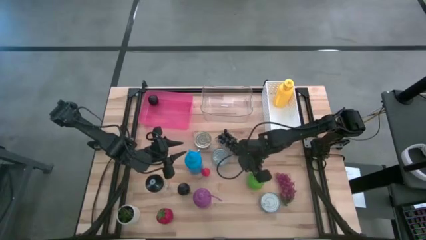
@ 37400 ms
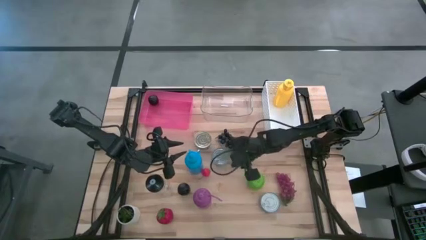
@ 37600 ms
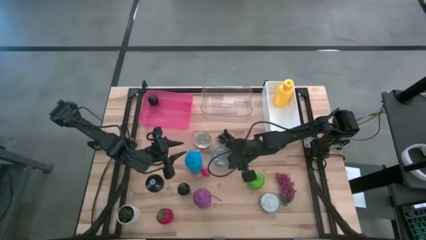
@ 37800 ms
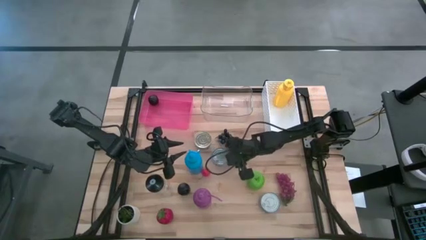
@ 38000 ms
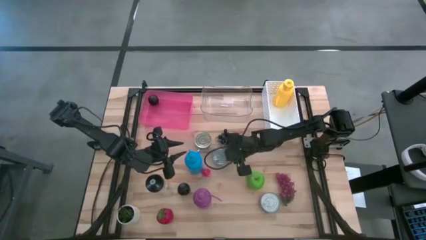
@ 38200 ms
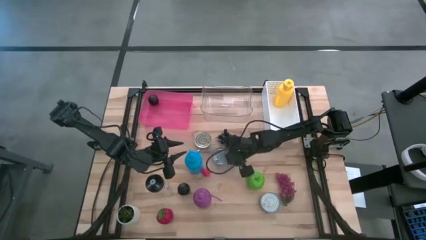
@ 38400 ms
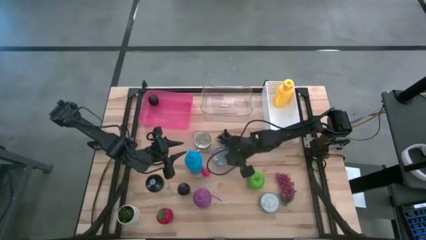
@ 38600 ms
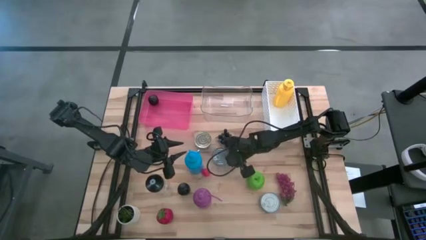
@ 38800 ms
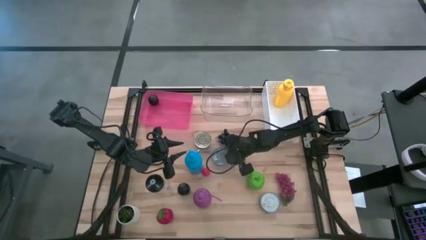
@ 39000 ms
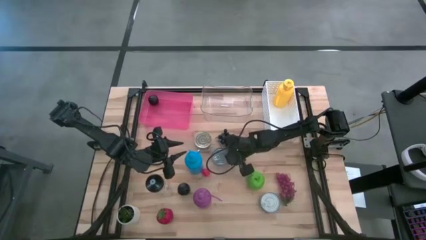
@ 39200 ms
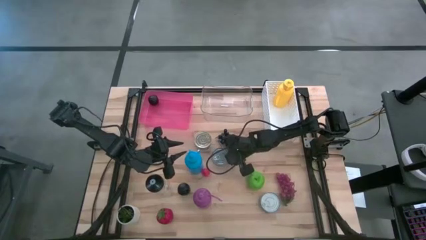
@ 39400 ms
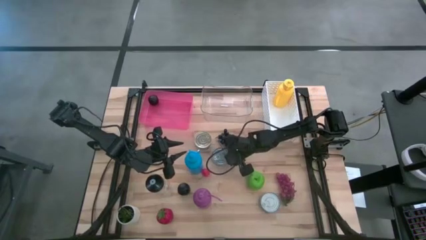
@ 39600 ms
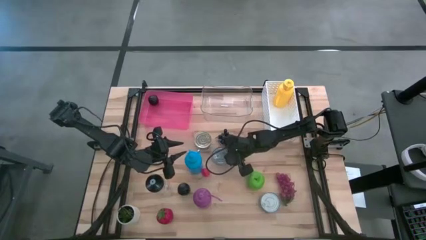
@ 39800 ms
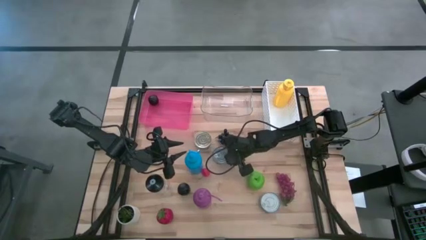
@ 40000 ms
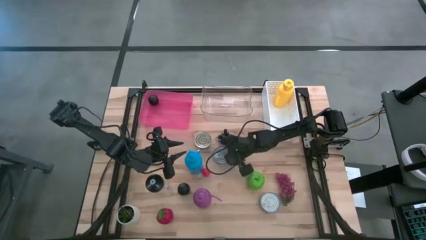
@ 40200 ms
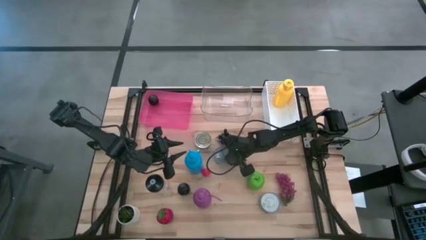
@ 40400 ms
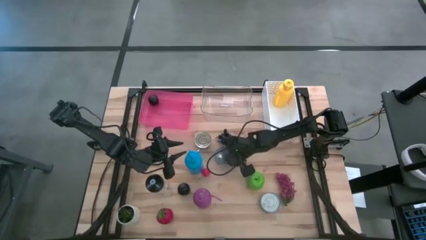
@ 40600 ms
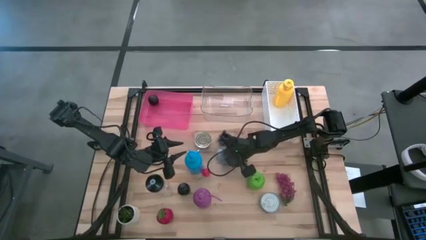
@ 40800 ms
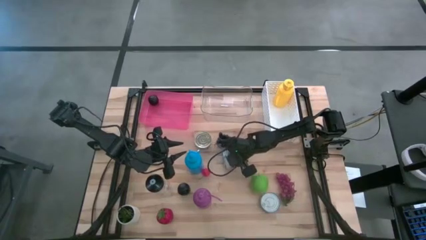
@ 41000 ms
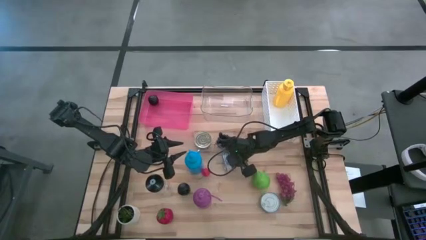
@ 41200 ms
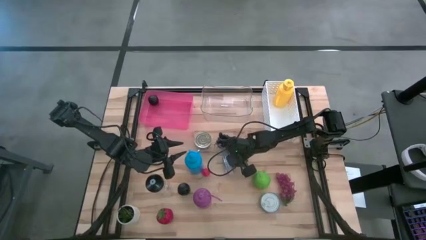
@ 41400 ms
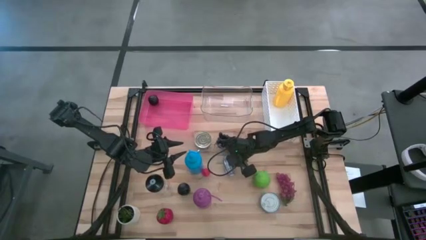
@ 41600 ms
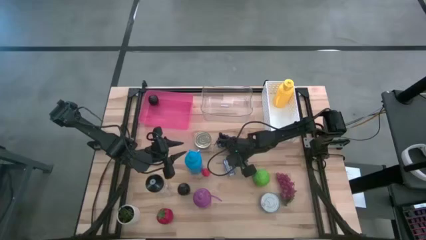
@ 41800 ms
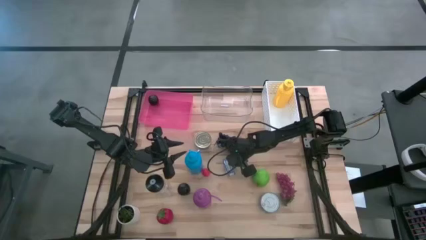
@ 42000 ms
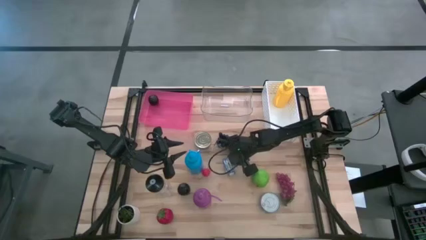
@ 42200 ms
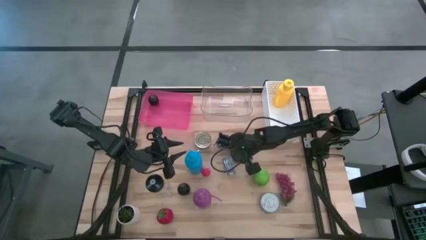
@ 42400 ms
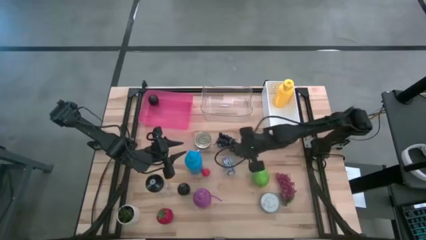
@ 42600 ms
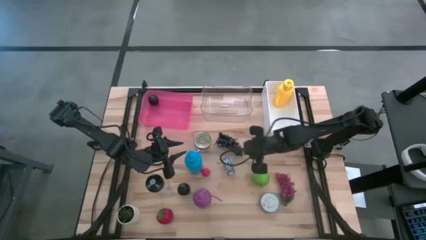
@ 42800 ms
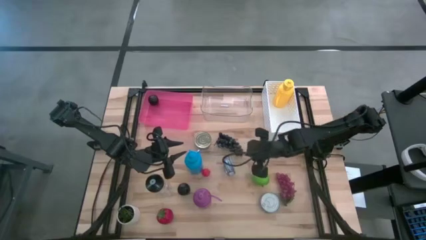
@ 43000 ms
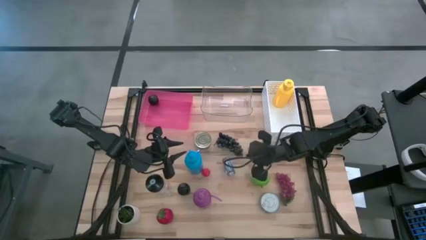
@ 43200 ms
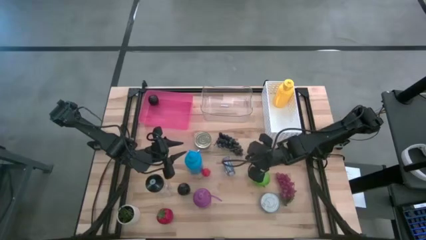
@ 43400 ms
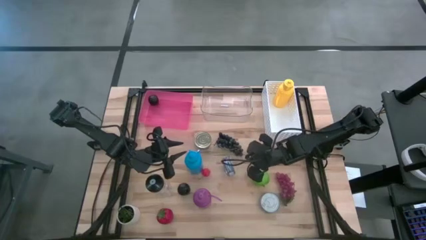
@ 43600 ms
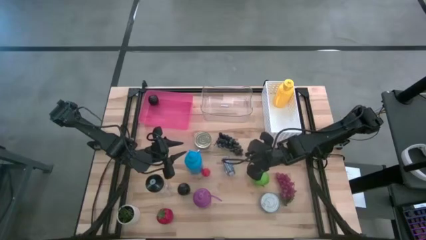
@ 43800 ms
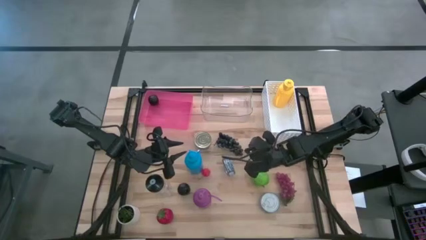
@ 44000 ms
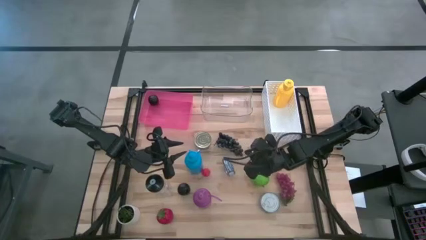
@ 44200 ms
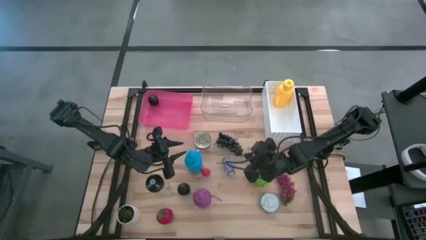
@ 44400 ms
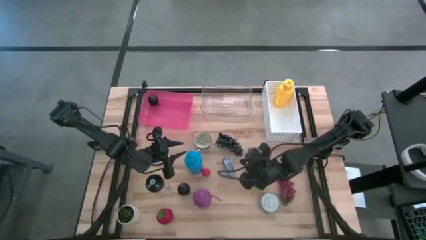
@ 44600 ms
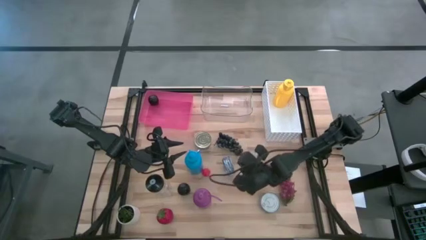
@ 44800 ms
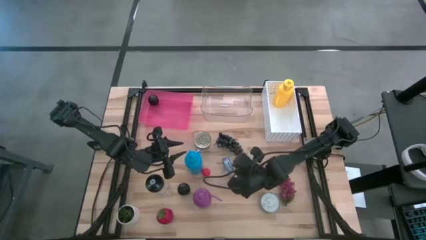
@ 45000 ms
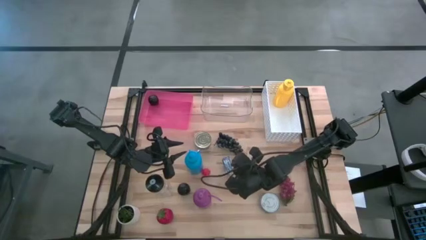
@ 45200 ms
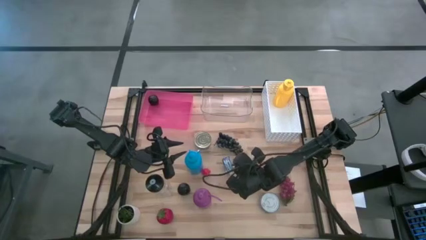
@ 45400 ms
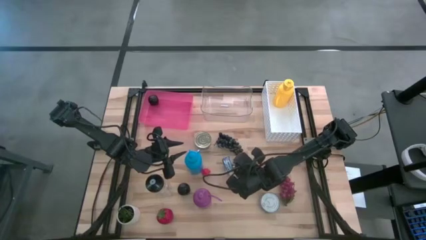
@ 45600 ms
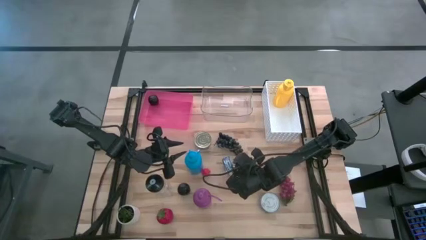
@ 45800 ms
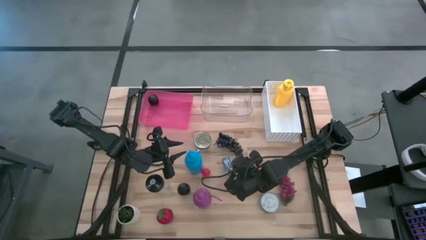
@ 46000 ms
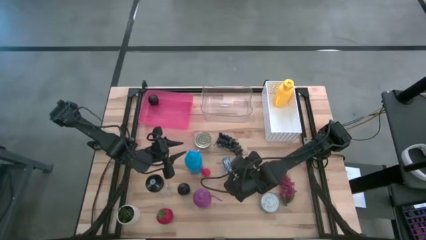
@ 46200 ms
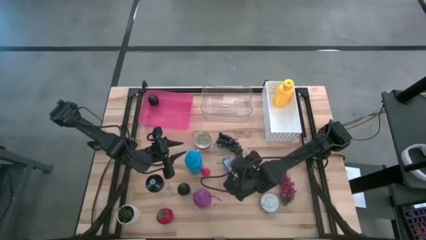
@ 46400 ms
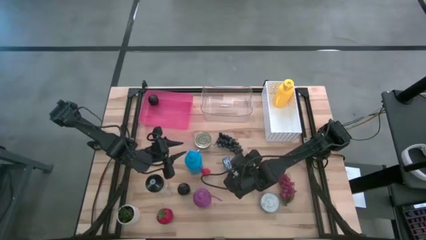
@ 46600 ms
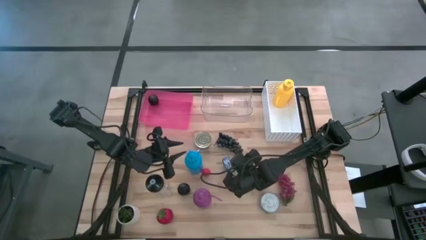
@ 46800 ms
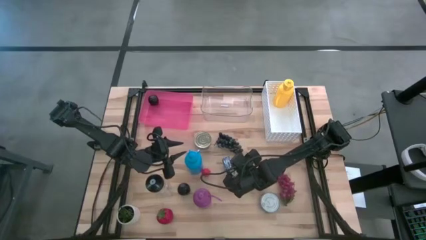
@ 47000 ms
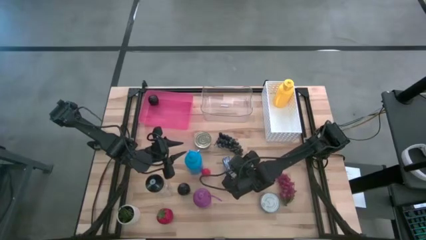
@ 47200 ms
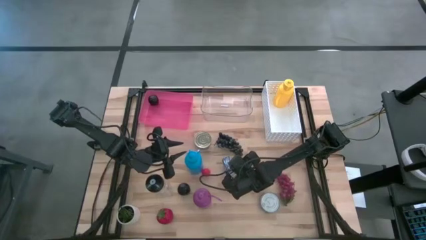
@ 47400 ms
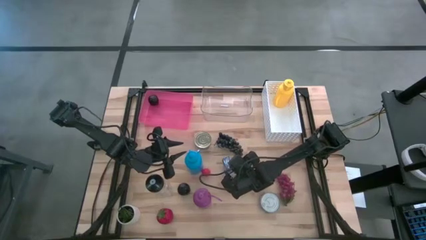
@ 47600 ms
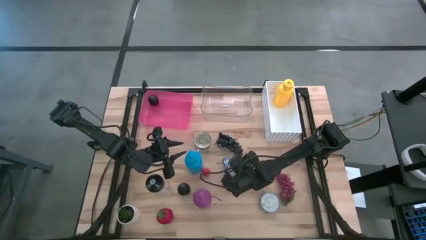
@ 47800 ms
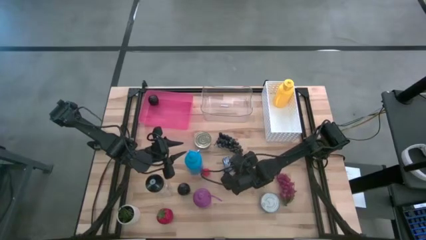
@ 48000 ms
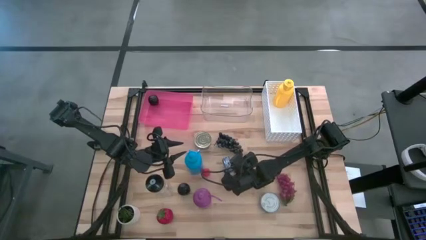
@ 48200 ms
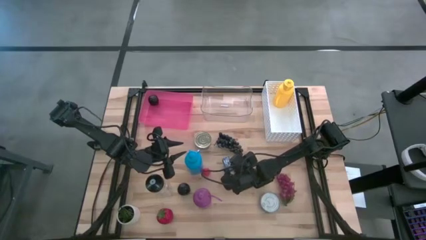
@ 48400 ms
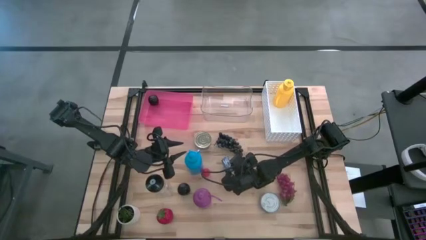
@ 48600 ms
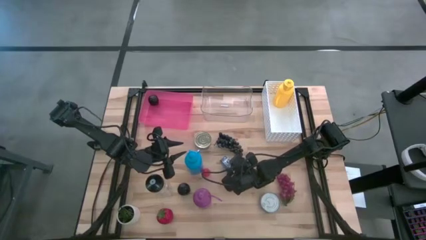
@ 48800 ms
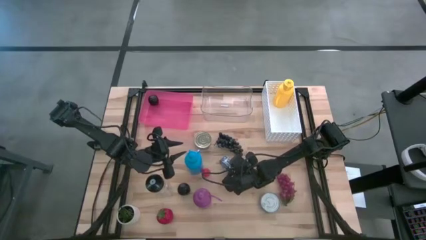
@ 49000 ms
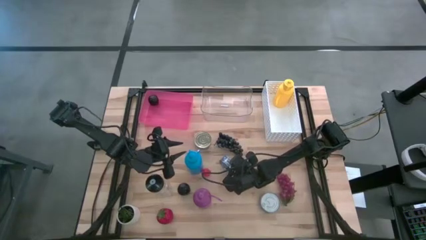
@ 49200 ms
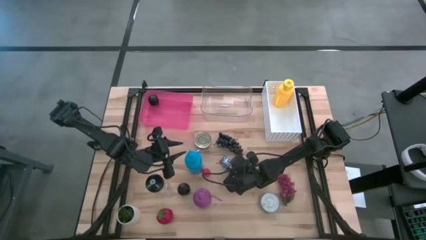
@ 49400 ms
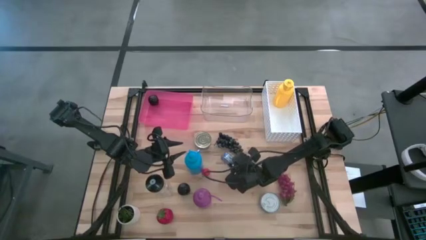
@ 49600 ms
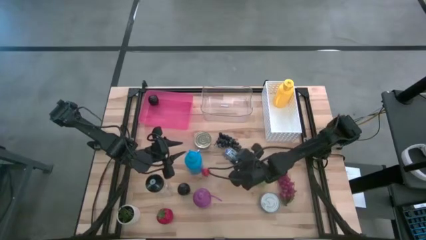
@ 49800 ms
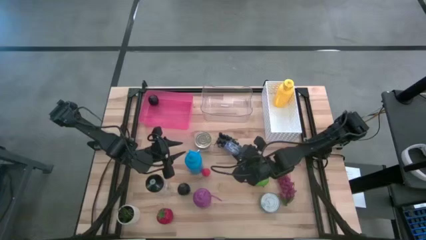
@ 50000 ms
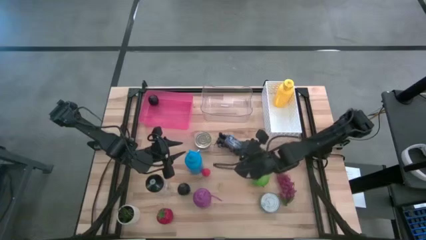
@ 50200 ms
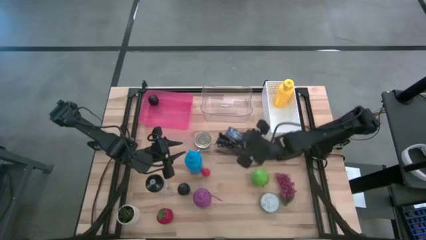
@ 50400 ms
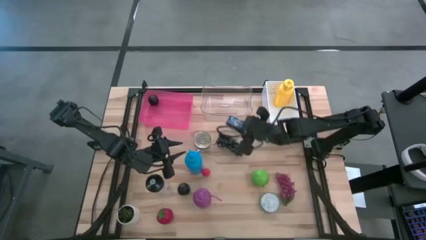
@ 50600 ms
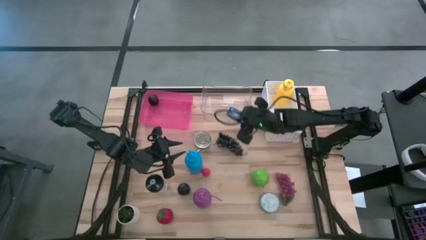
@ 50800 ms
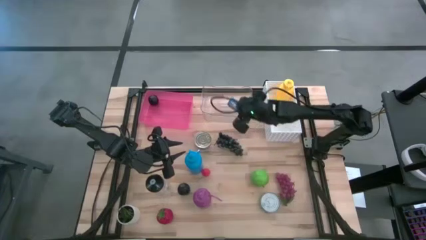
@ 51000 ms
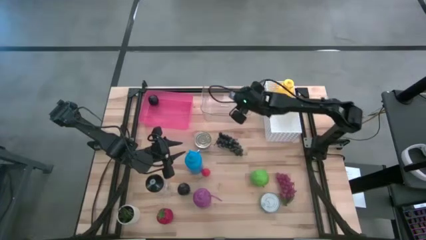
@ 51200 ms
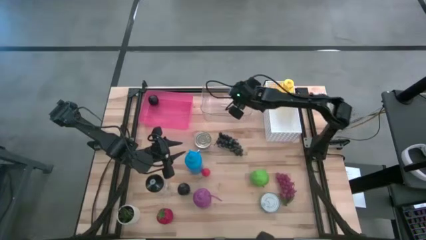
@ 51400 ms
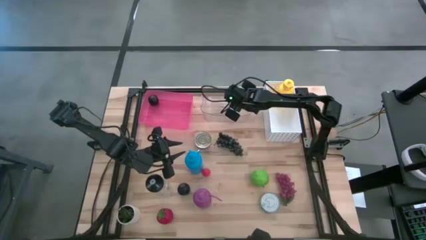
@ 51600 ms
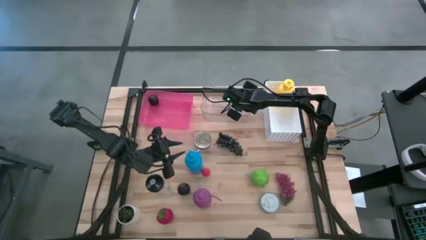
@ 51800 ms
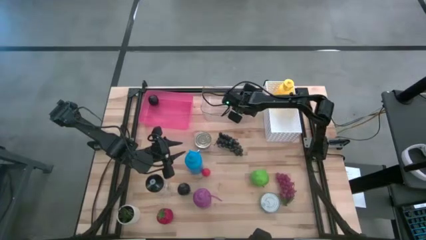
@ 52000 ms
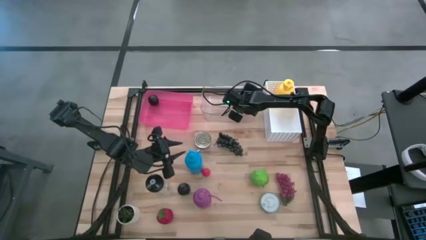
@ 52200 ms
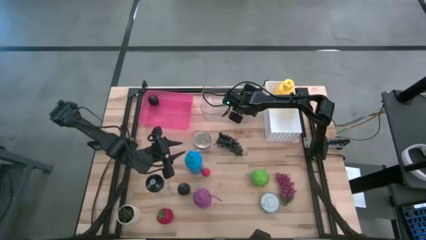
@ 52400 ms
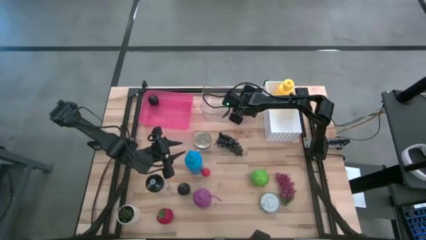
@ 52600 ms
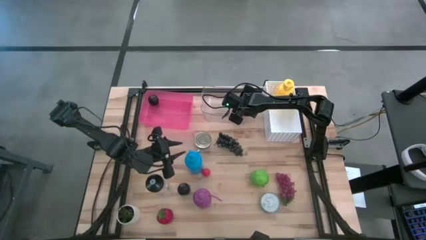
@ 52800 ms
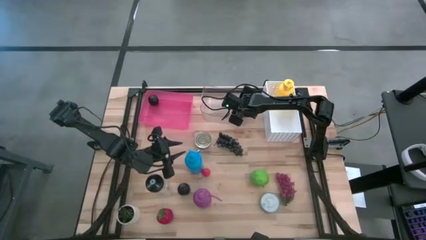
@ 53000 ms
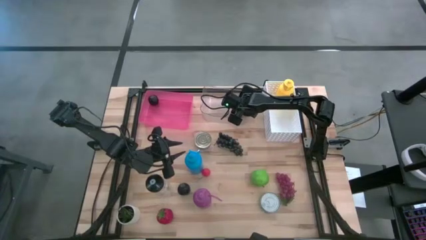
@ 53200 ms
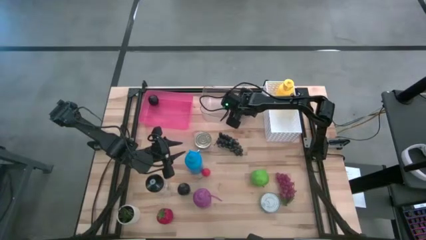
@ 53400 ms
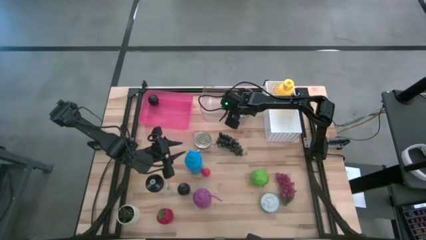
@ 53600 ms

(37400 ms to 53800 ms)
Task: Pick & Place Food Item
Put the blue tuna can into the transparent bin
